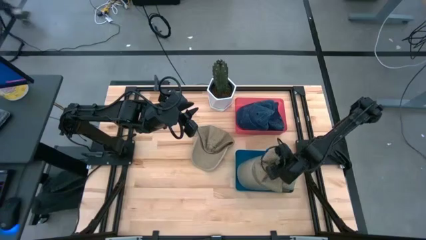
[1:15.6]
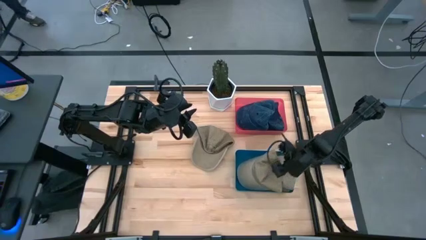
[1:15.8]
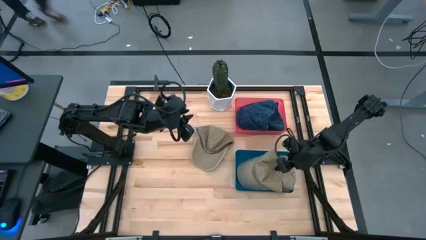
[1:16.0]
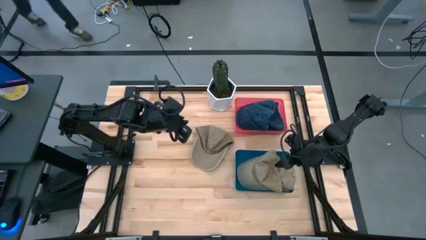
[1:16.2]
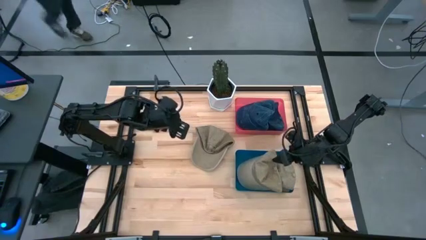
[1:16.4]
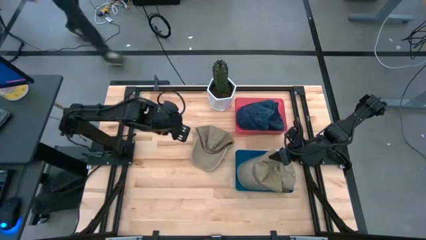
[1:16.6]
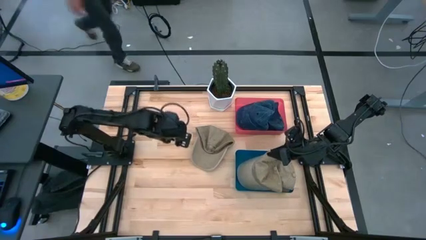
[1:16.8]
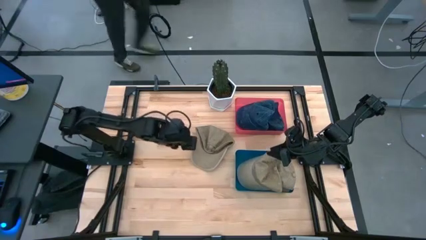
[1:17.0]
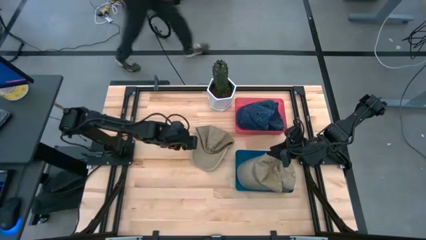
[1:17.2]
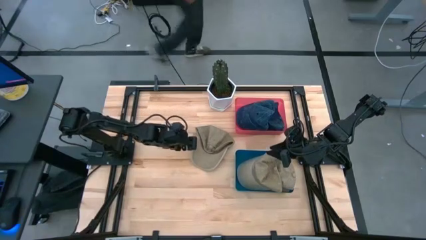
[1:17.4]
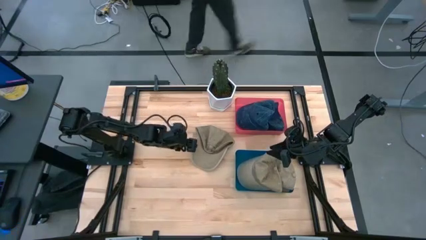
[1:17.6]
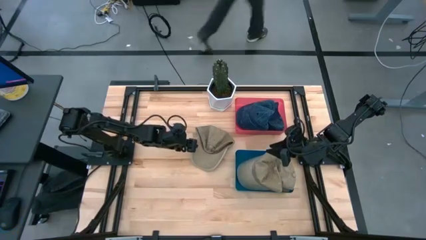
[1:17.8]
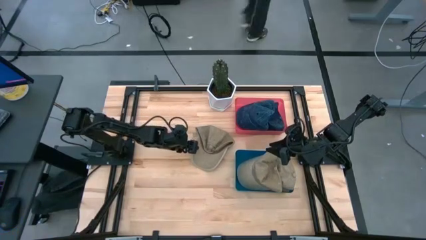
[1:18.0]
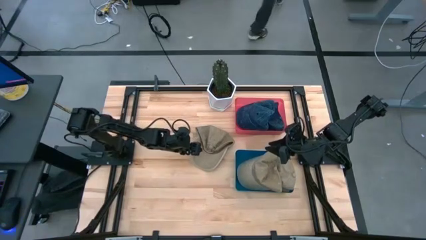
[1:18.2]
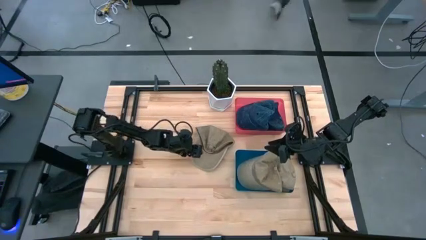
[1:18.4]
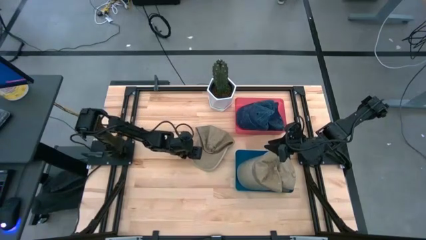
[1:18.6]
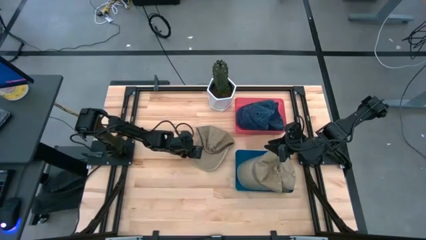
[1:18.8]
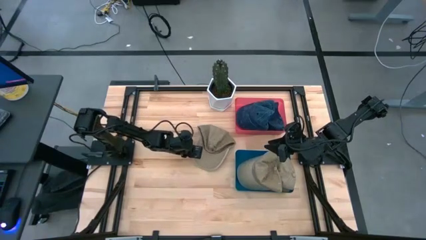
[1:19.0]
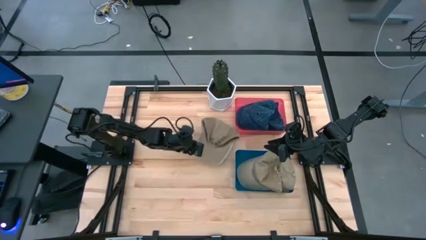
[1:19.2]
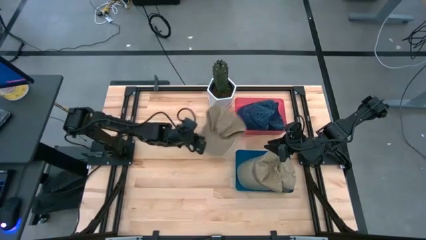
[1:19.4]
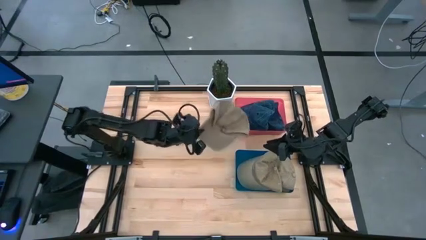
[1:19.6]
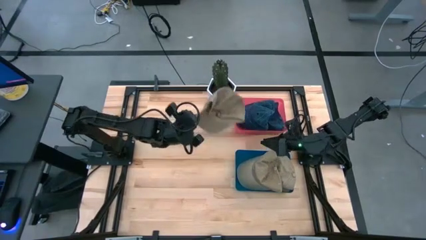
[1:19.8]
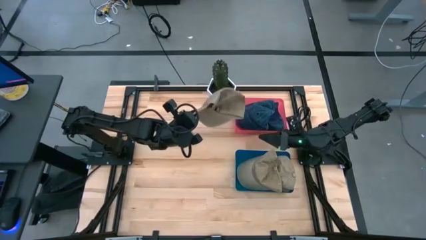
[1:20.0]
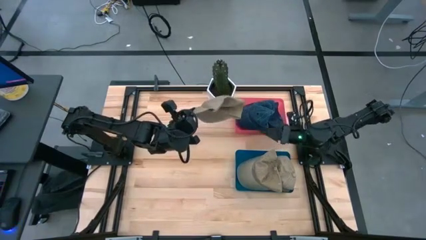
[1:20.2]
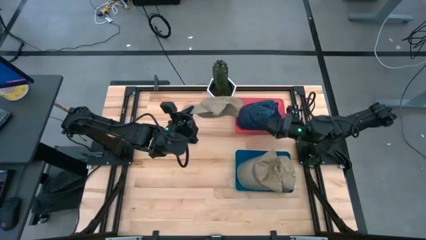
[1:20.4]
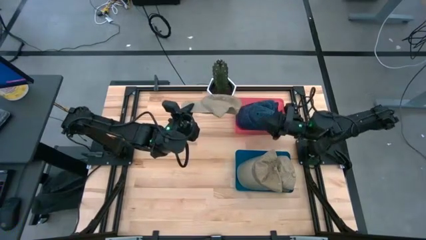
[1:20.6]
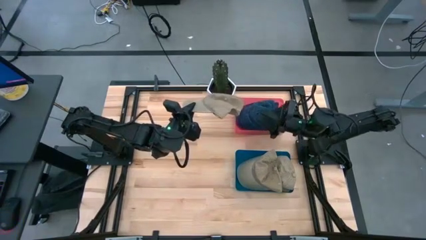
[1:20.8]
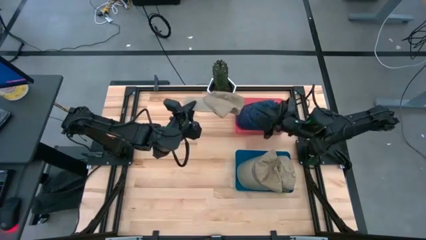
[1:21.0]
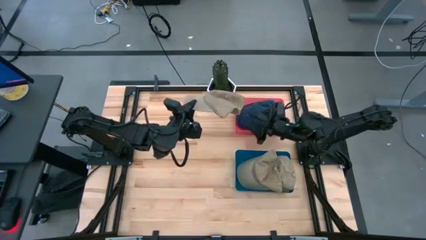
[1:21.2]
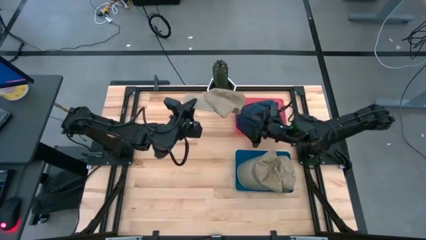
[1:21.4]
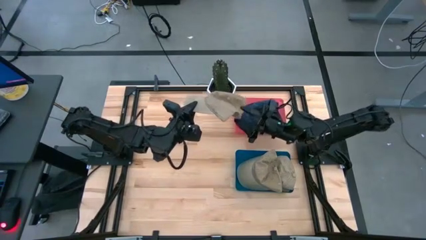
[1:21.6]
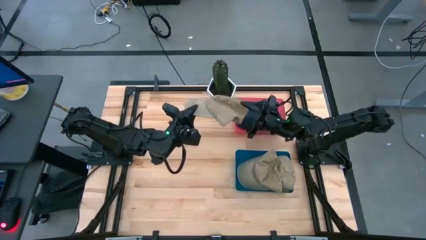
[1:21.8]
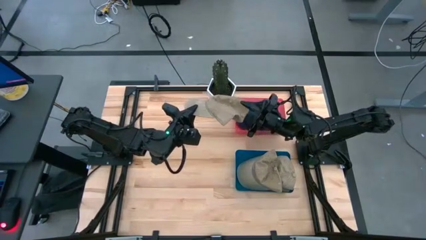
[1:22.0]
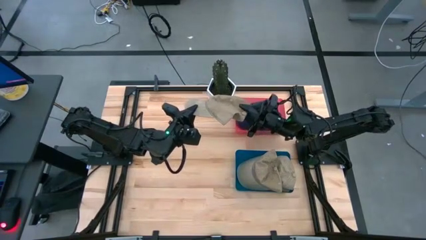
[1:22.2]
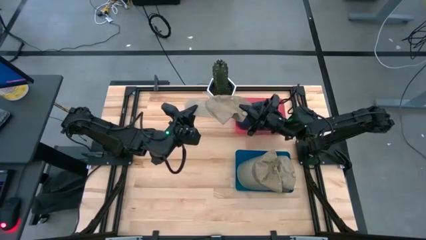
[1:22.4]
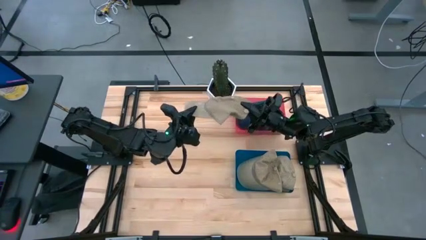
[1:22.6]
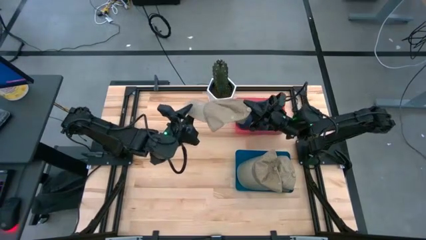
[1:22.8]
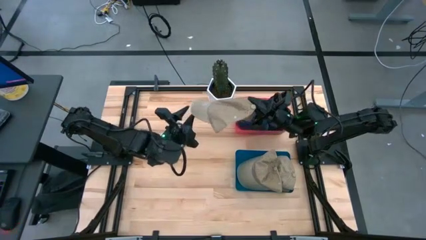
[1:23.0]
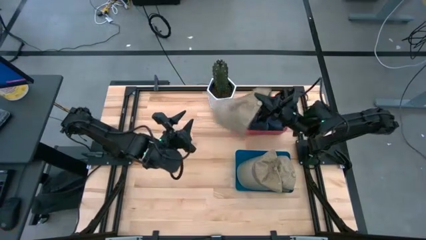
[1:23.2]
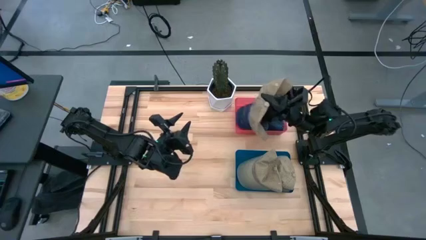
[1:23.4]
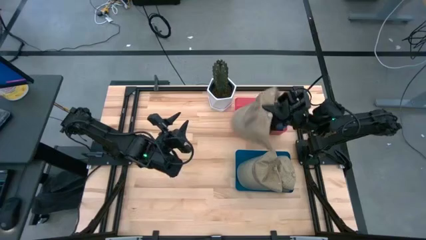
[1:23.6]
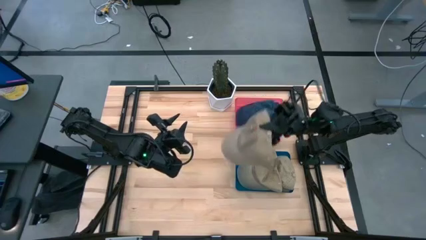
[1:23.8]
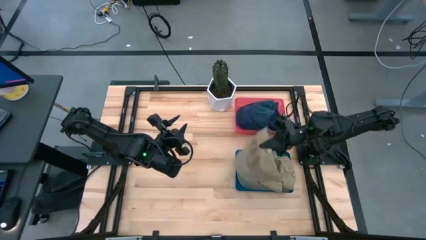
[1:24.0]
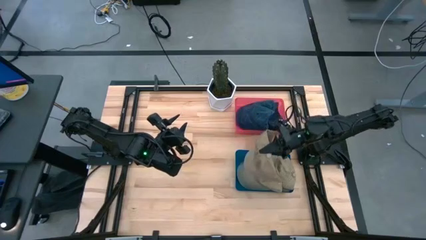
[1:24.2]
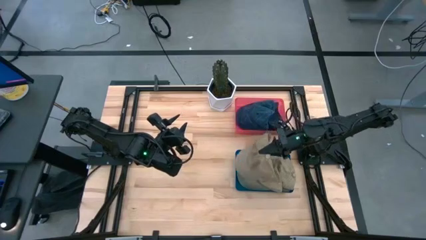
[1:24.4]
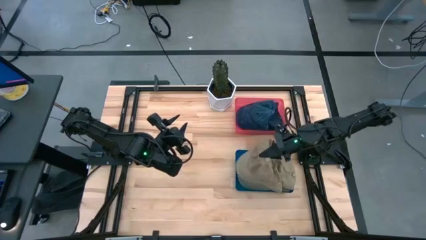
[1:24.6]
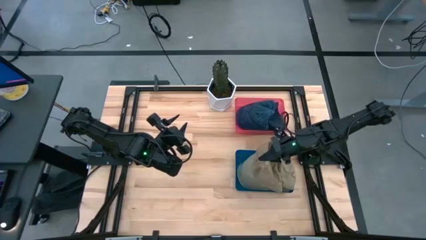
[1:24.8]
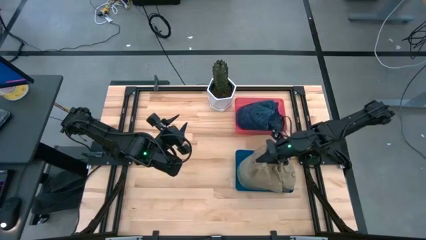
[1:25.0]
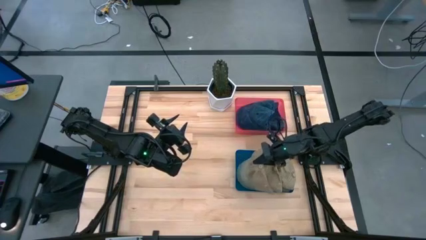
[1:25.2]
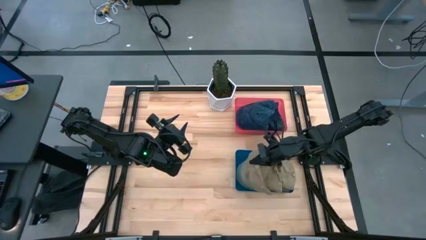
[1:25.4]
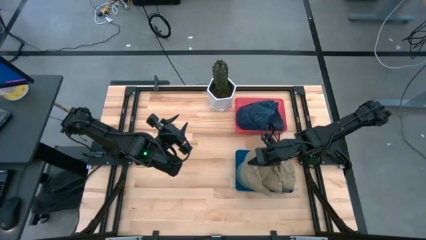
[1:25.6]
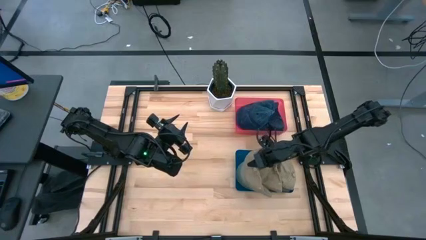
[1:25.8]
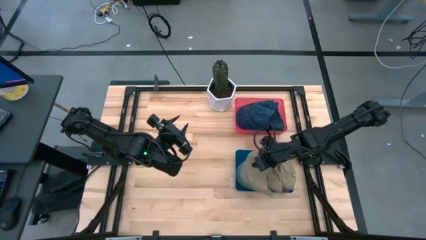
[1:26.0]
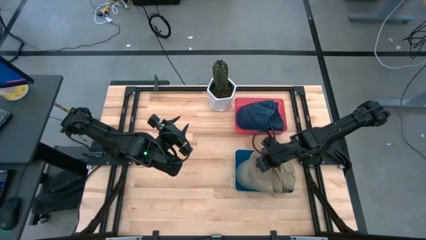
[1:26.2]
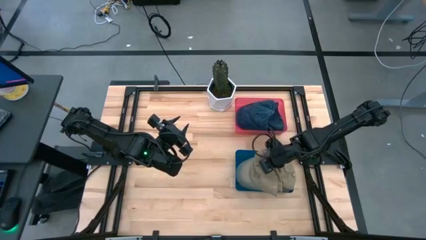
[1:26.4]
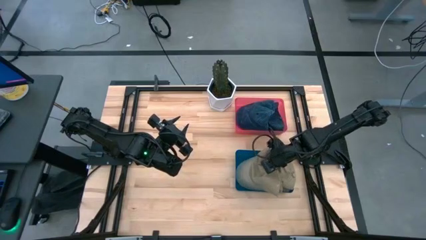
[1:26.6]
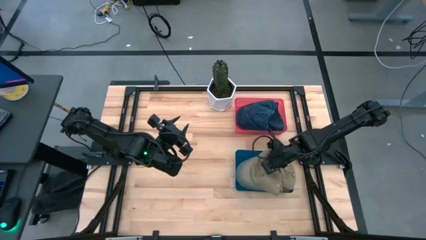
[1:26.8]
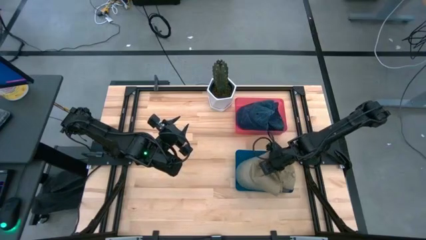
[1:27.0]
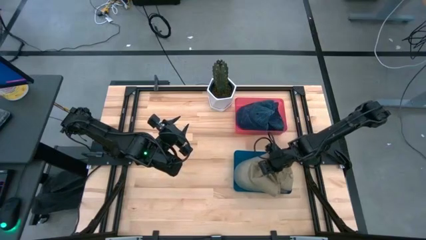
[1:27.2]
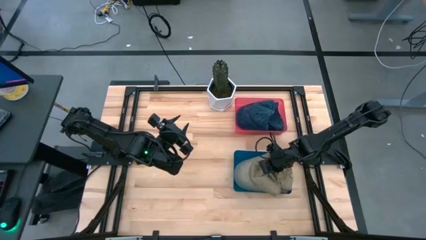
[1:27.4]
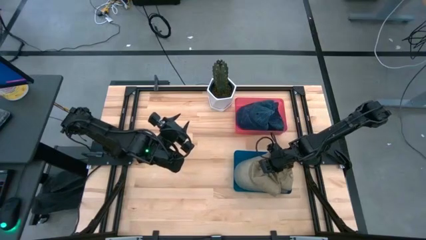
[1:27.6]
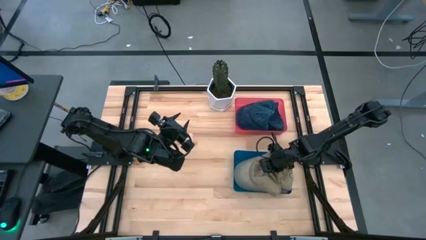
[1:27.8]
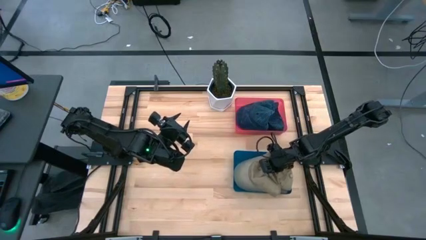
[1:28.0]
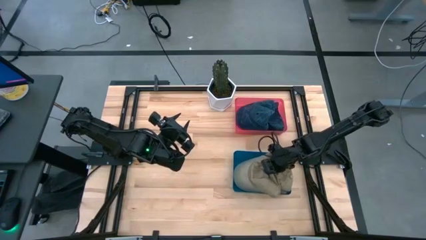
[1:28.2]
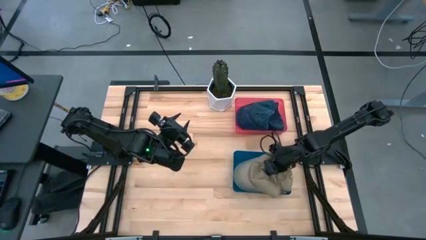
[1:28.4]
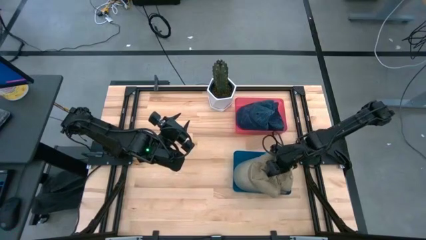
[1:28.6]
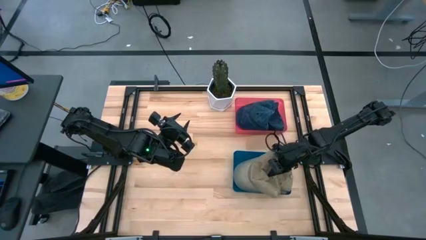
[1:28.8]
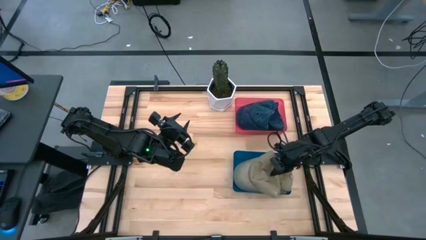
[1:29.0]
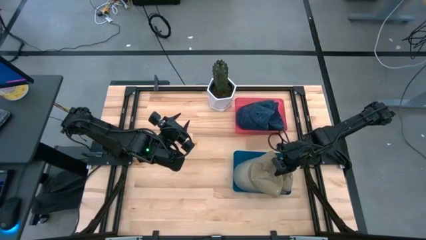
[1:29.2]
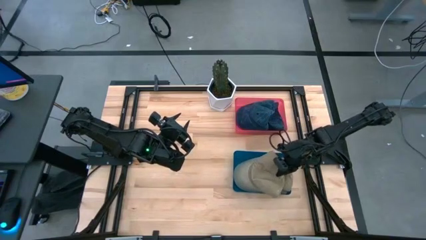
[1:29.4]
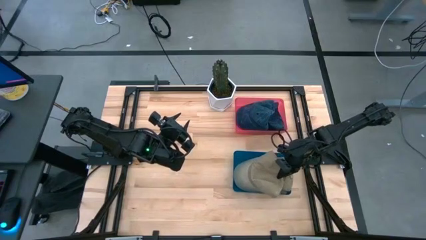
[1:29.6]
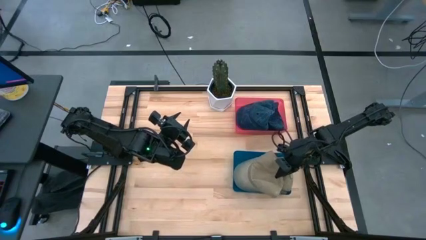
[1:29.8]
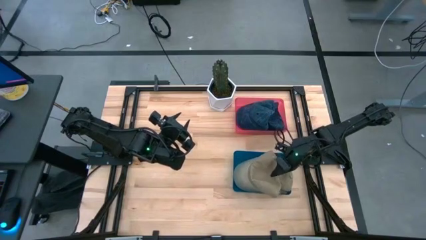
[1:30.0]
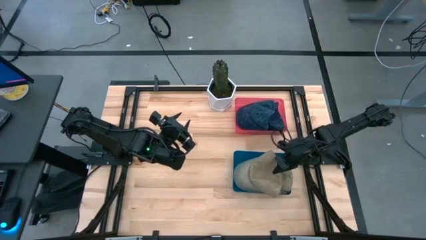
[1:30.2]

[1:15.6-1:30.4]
Task: Pick & Place hat
Put the brown cap into the blue bin

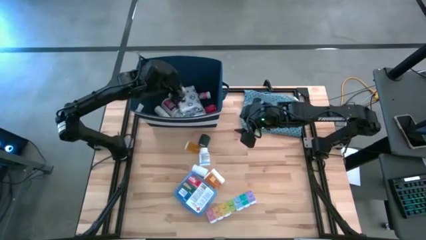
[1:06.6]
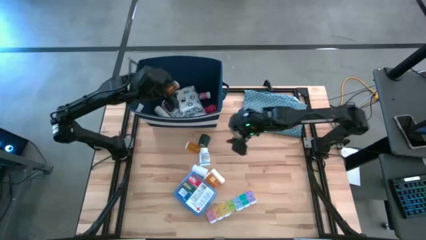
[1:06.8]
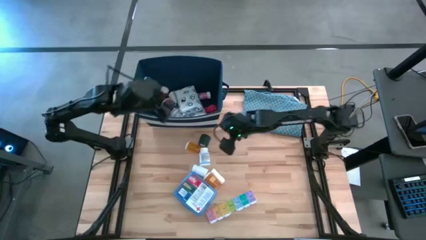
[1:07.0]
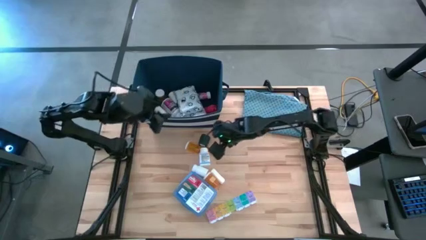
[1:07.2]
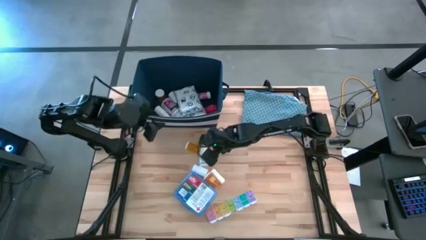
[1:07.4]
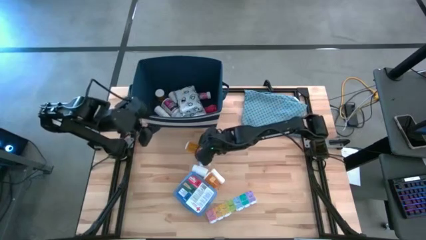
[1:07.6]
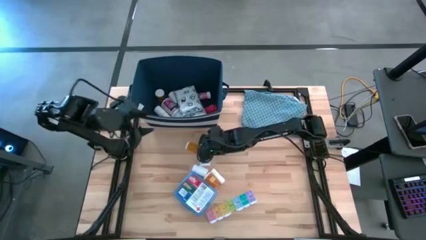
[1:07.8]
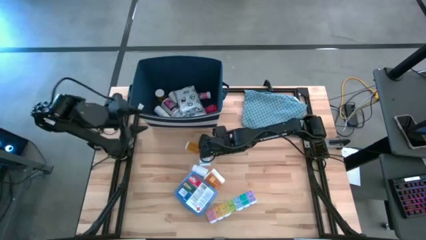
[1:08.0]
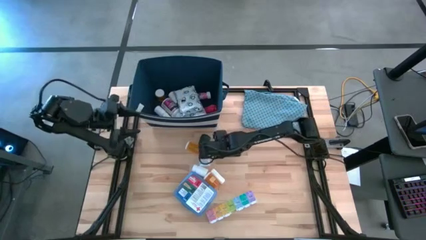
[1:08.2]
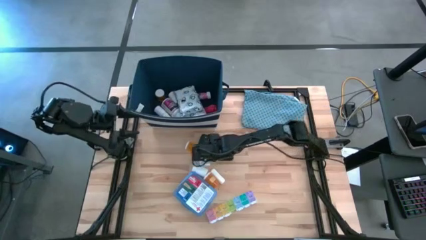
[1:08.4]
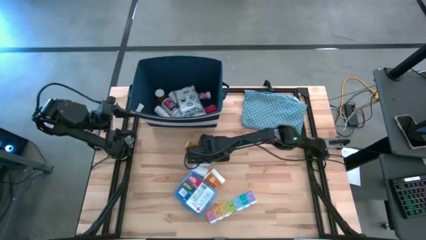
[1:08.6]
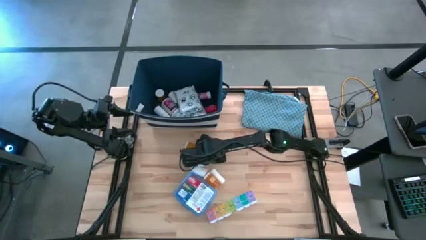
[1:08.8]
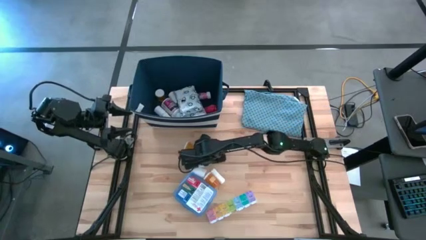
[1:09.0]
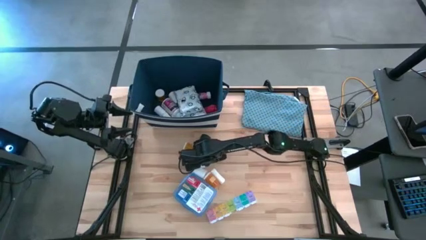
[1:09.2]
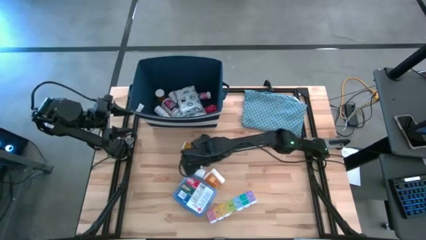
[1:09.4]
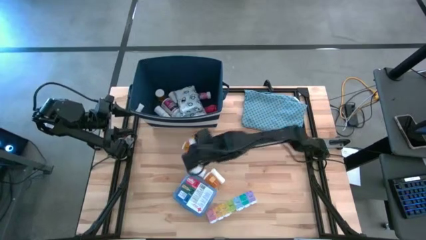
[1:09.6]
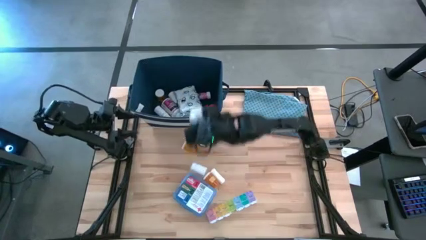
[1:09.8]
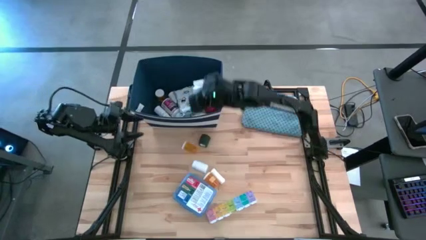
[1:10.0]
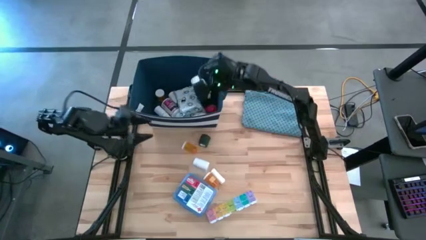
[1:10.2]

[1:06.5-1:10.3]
Task: Pick & place medical supplies in basket/bin
Put the white and blue pill bottle into the blue bin
